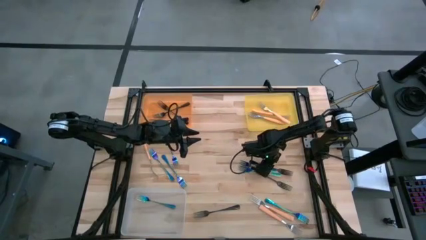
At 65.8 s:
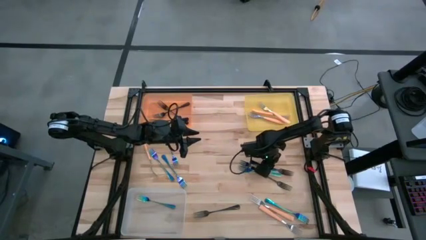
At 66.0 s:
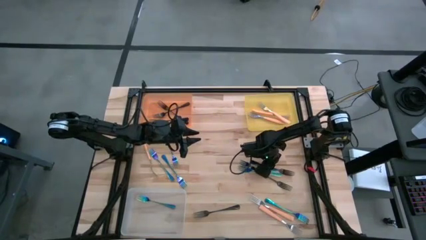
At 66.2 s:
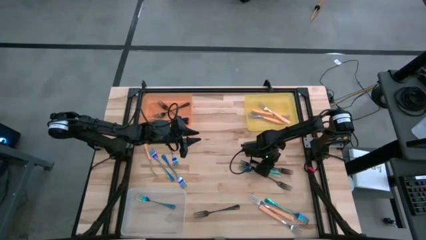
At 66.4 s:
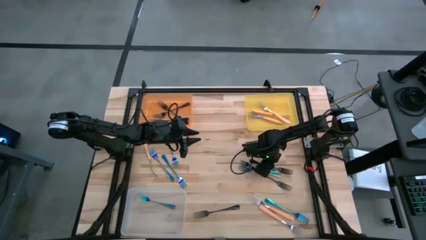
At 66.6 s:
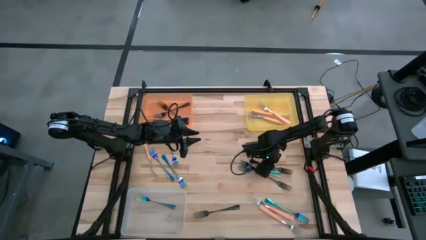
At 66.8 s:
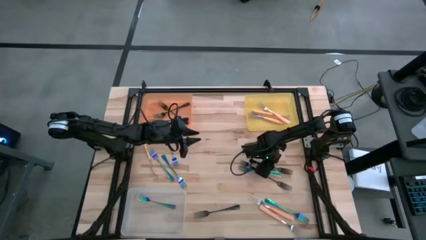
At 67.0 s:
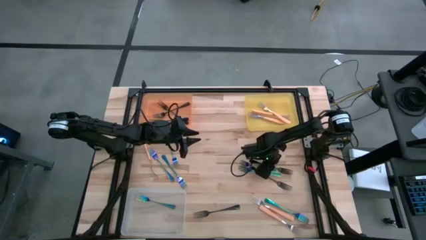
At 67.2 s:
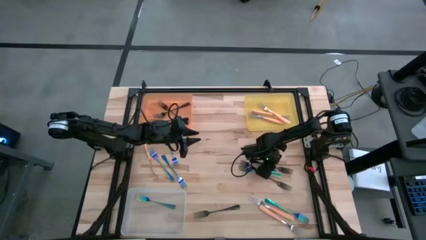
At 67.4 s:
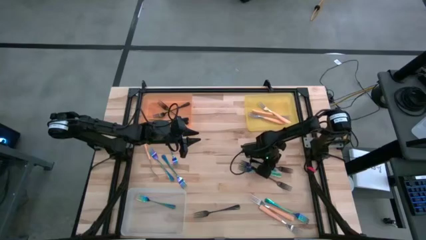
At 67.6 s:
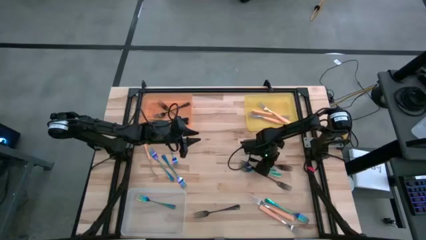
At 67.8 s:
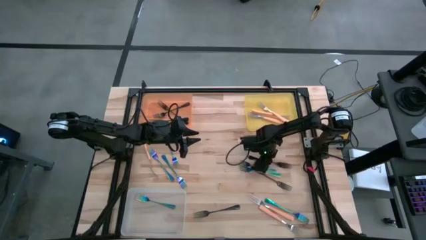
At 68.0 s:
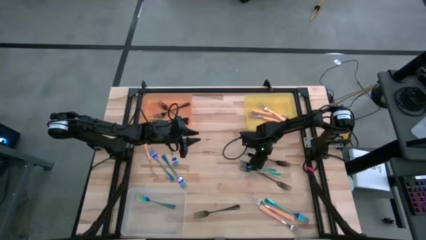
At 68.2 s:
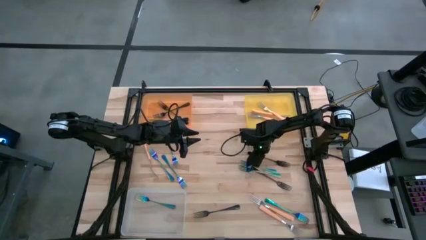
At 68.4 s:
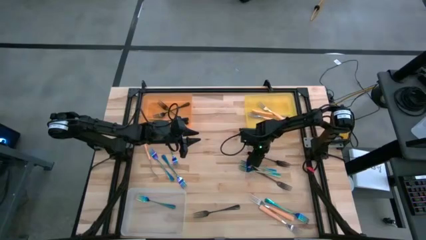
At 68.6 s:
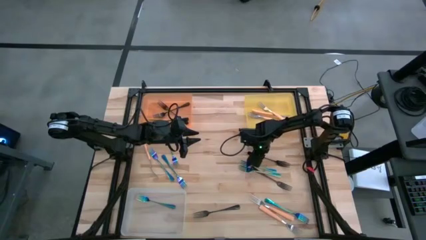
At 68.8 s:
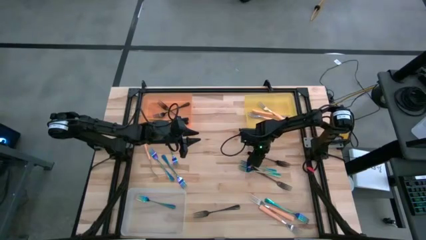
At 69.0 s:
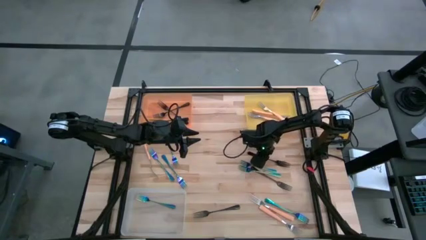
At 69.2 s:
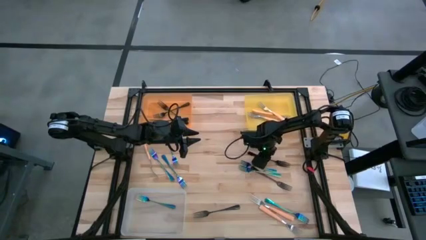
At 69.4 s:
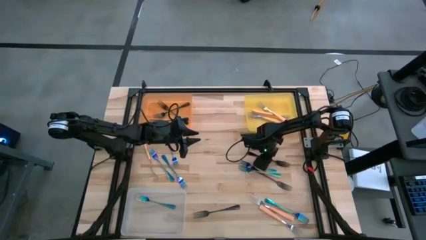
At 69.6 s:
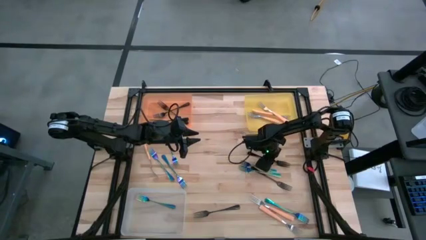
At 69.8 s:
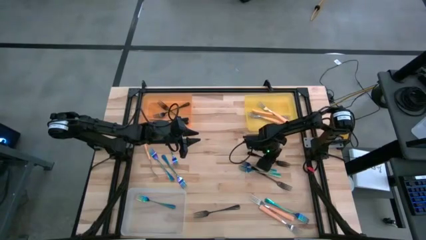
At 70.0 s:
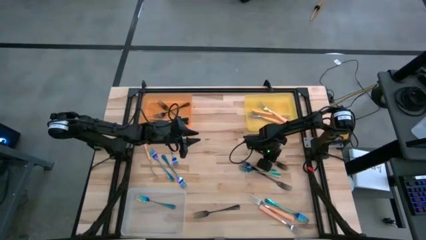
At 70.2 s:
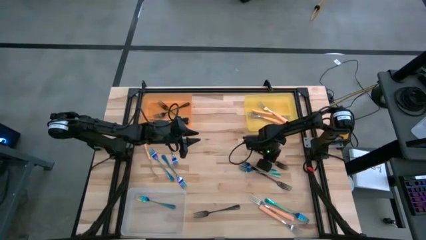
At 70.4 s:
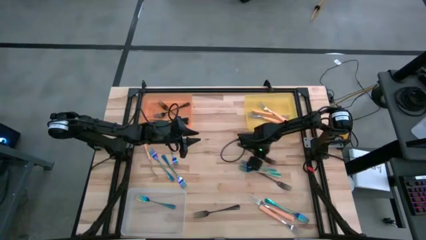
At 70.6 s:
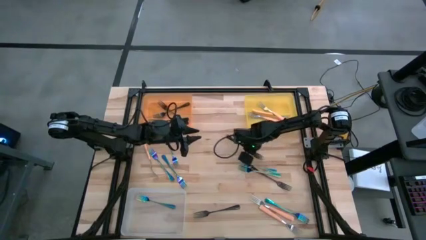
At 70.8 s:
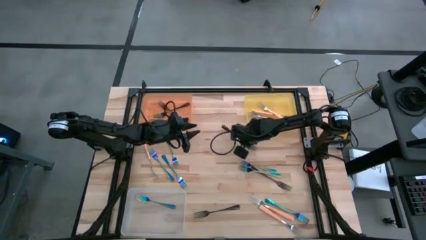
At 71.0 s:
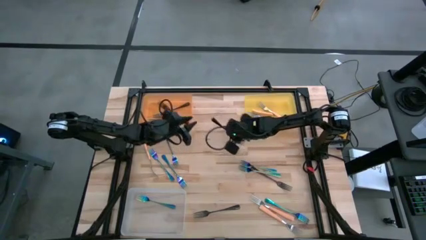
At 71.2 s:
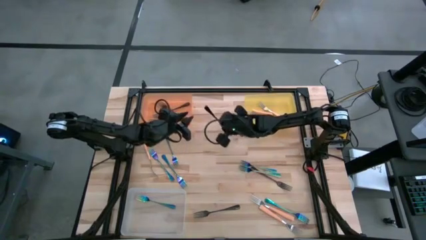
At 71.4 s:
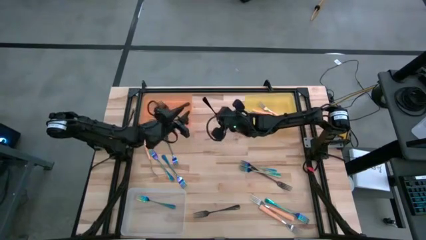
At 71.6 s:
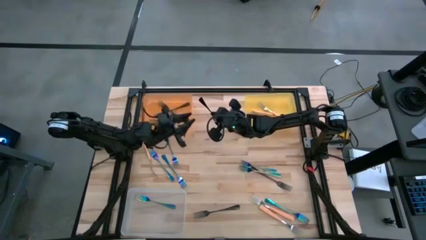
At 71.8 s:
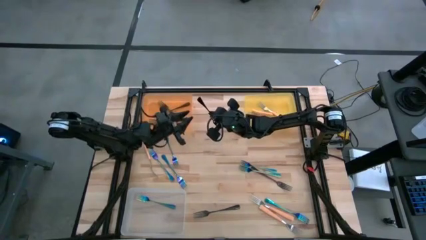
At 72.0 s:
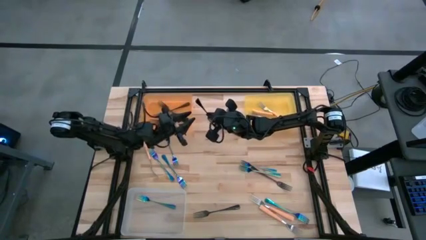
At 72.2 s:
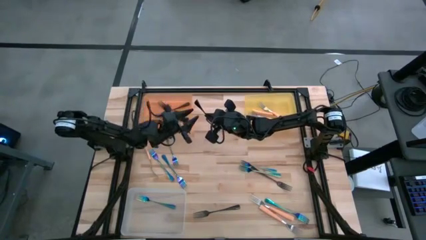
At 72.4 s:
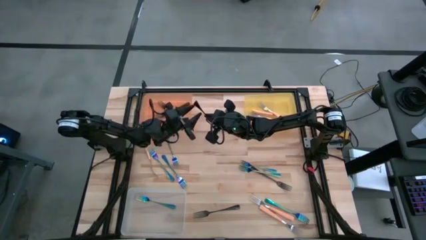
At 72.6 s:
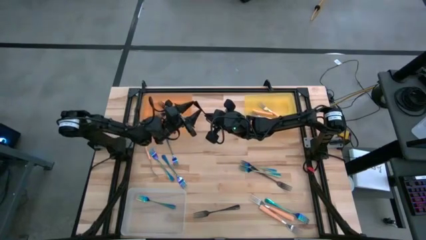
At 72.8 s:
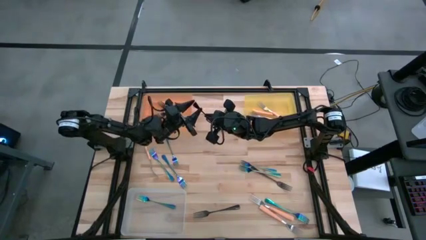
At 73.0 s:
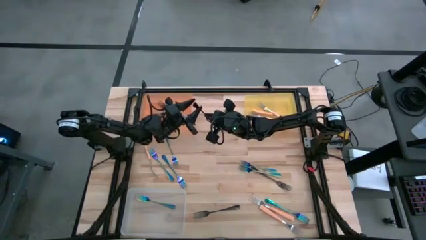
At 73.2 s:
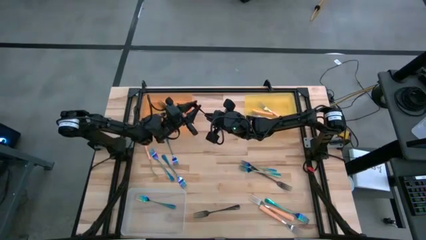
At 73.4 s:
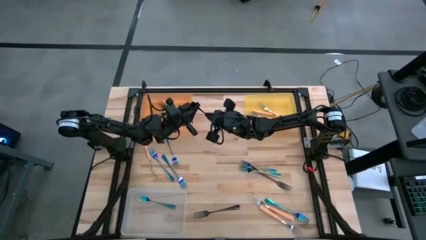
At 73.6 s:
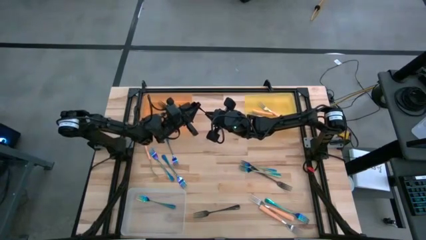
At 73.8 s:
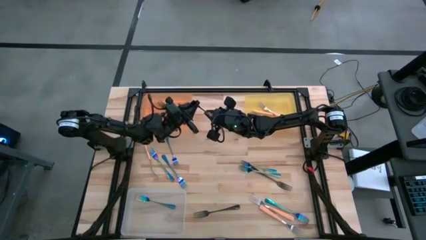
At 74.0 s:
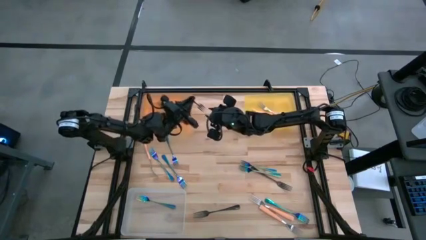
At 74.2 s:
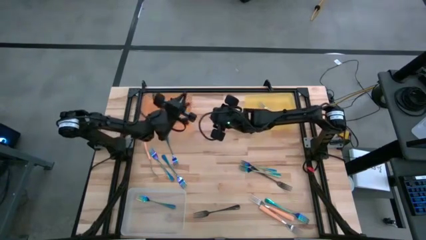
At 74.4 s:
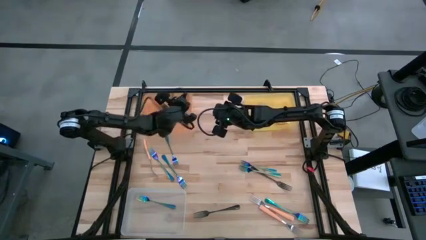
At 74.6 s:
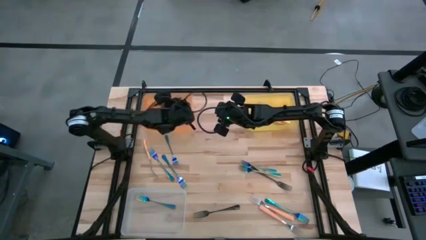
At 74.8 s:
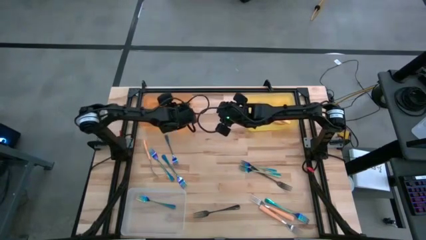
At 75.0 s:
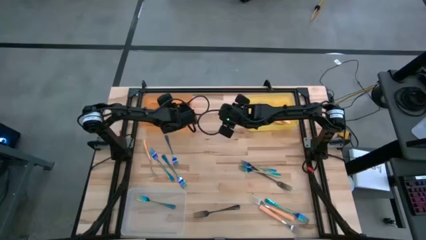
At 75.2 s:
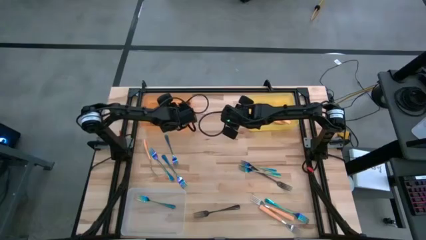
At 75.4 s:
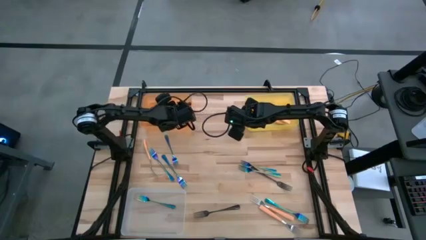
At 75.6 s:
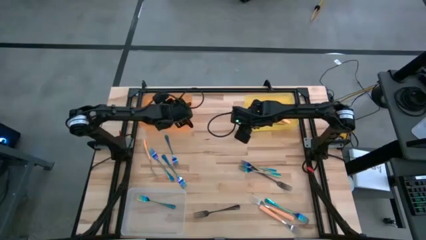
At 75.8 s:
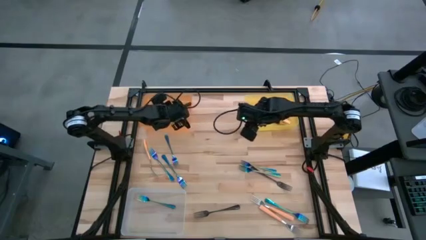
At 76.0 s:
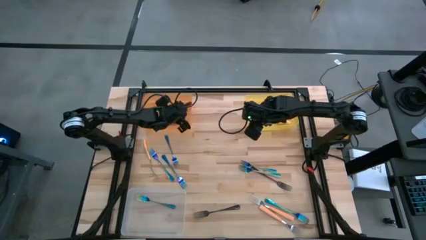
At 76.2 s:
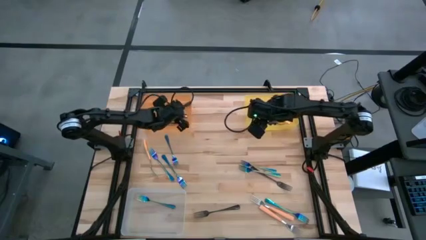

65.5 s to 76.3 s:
Task: Sort silverware by color (type)
Put the black fork into the orange bin

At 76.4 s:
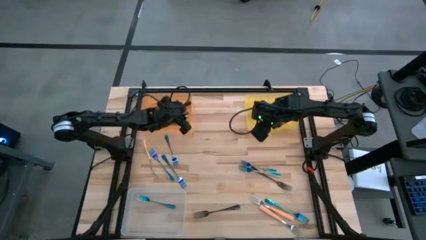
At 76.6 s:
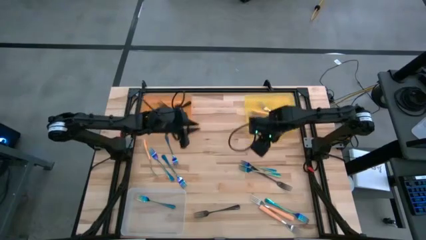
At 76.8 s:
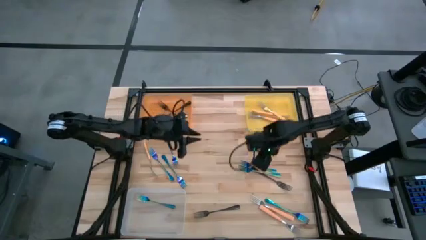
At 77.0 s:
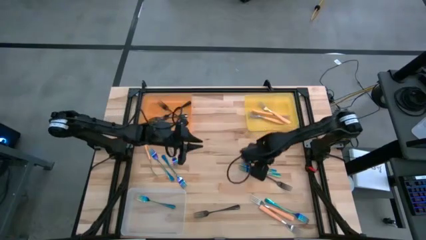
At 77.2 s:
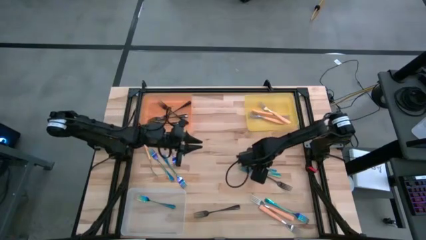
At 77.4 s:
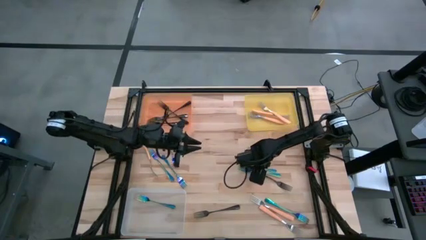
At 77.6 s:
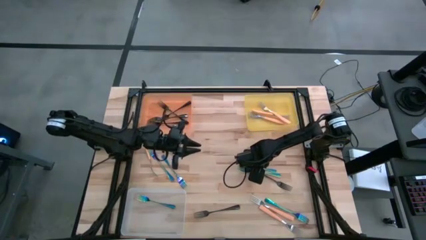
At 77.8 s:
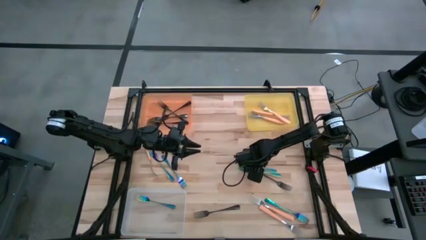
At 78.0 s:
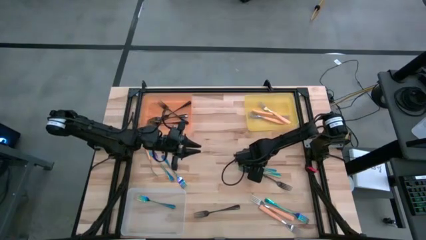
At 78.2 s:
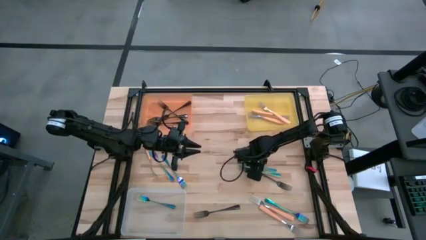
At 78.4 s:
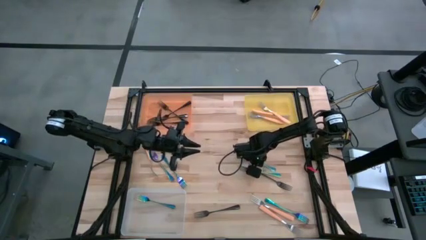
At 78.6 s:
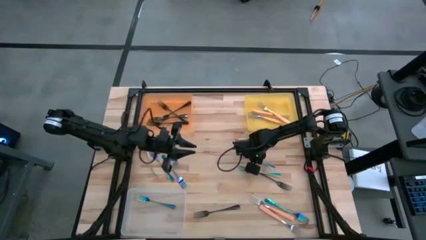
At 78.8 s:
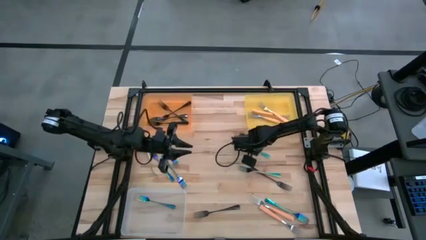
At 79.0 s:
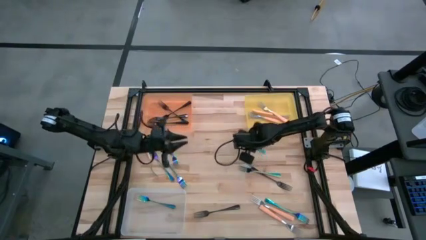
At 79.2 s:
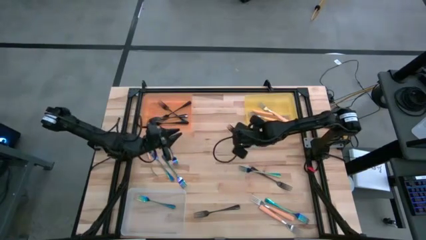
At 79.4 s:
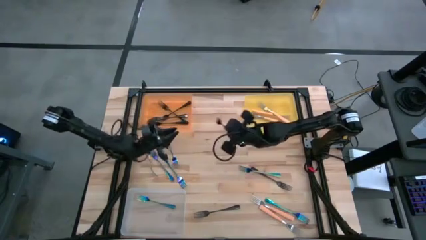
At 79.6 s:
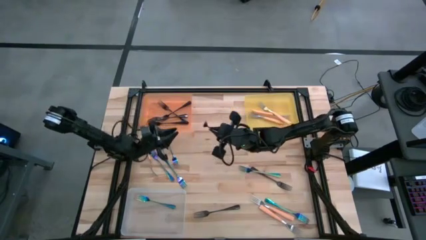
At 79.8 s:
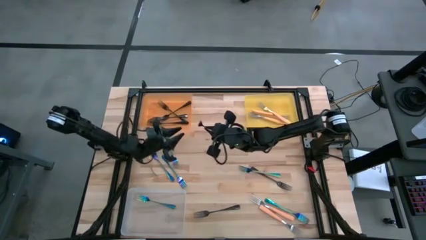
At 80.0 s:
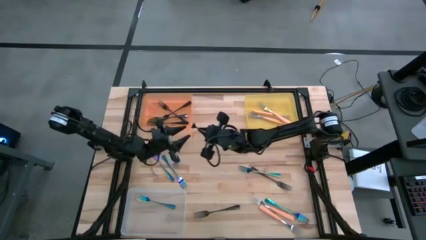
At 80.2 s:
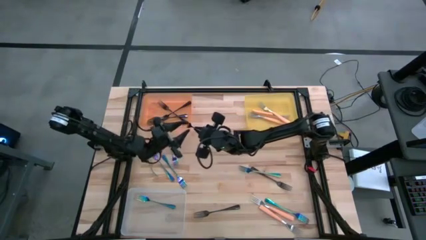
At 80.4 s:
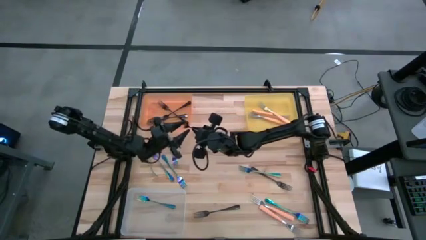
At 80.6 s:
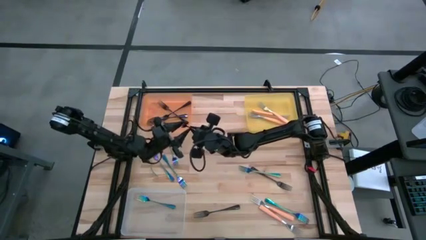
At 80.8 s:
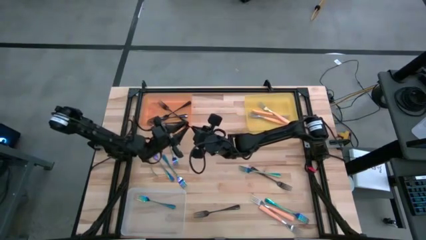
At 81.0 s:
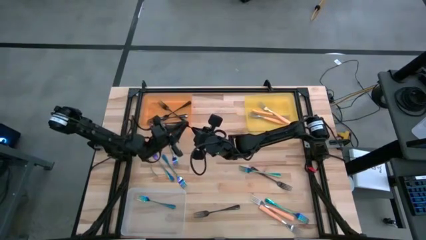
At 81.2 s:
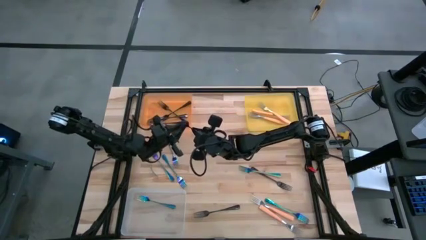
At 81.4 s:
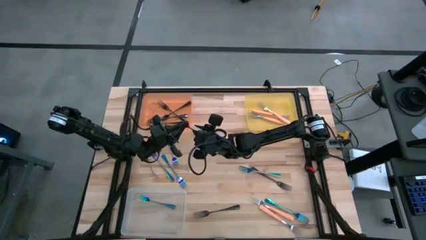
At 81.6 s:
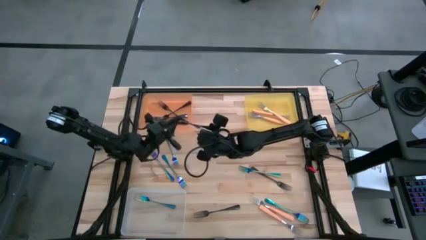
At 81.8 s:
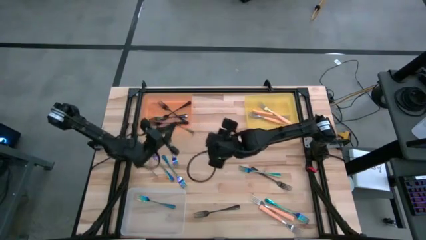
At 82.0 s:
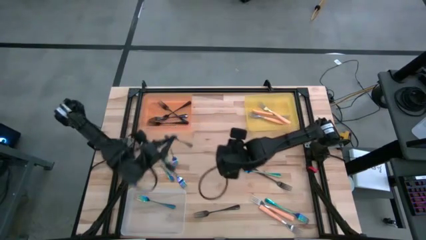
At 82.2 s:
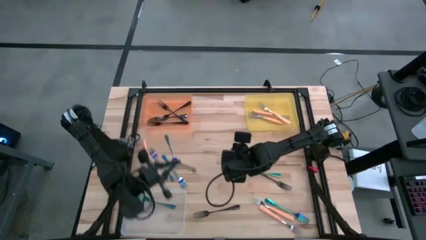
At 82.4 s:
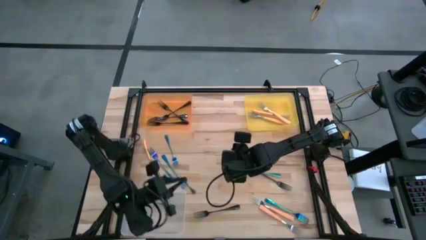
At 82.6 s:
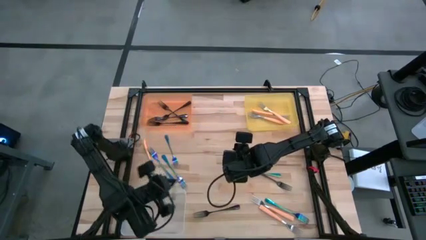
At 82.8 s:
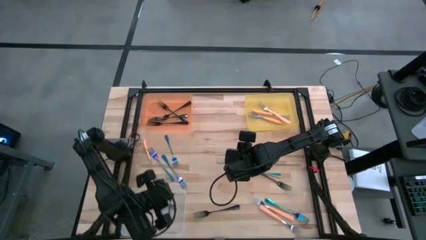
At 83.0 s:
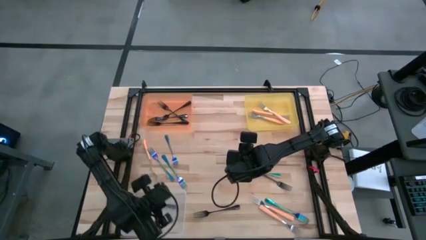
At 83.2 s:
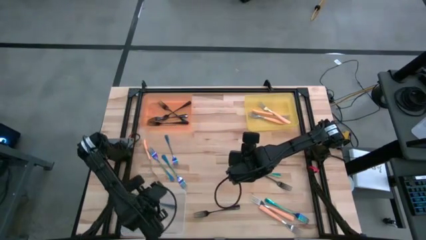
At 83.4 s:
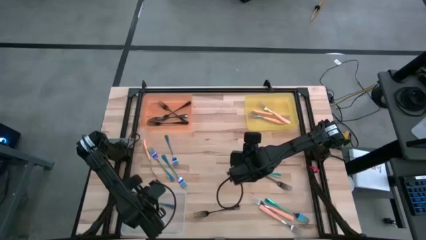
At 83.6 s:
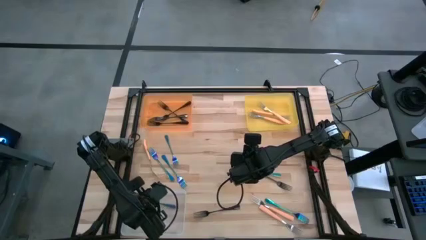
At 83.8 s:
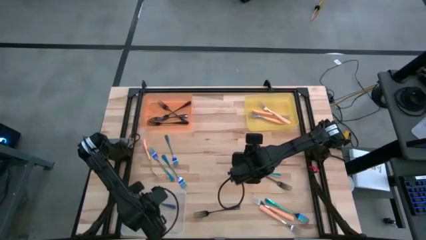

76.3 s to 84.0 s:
Put the blue fork into the transparent bin
